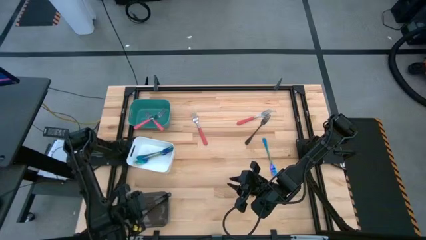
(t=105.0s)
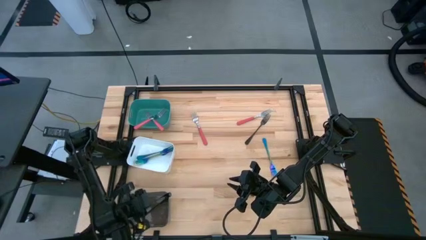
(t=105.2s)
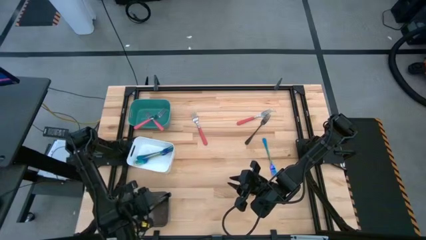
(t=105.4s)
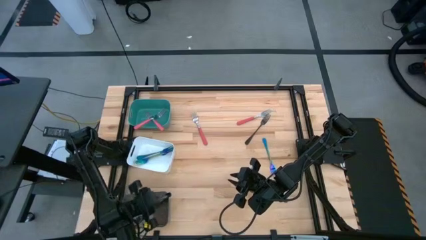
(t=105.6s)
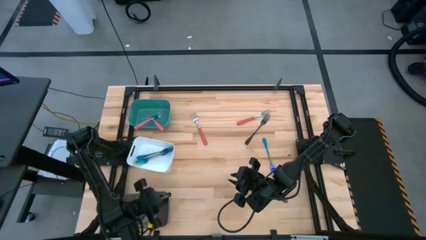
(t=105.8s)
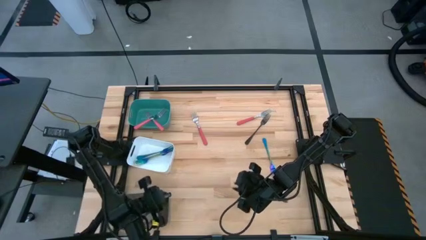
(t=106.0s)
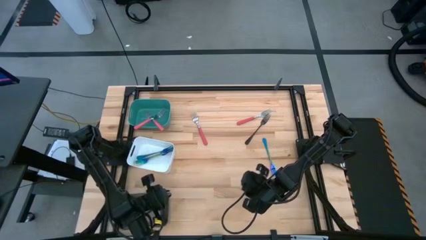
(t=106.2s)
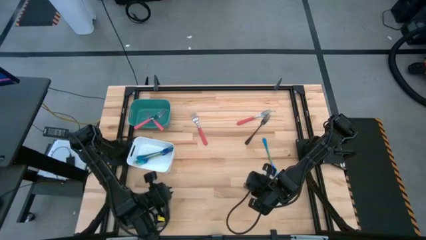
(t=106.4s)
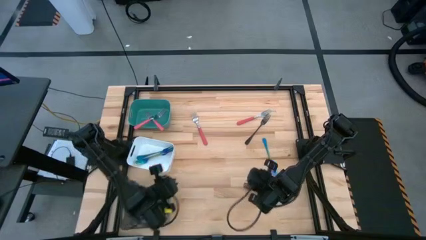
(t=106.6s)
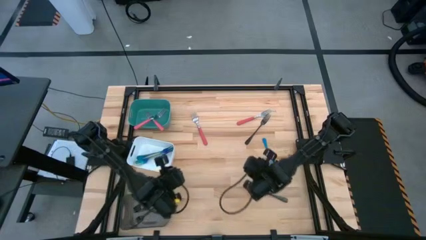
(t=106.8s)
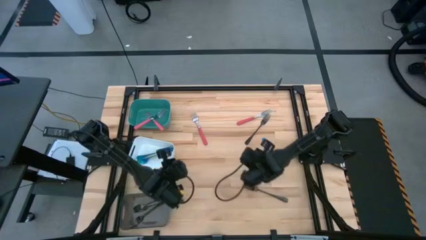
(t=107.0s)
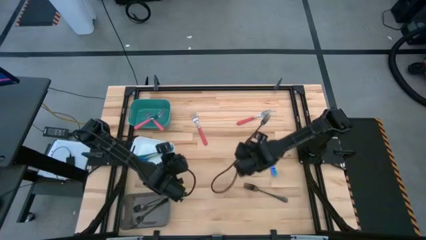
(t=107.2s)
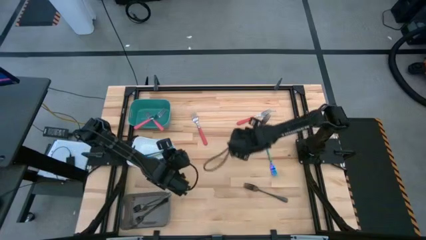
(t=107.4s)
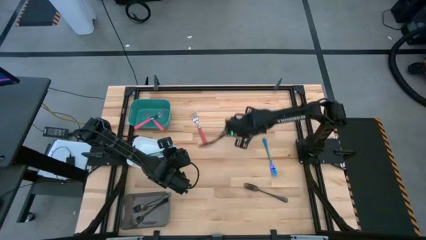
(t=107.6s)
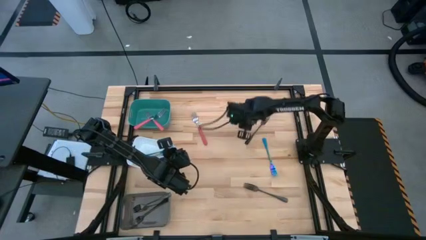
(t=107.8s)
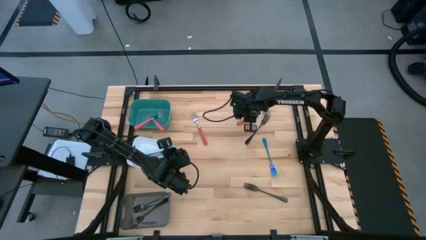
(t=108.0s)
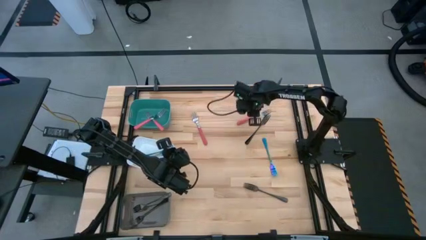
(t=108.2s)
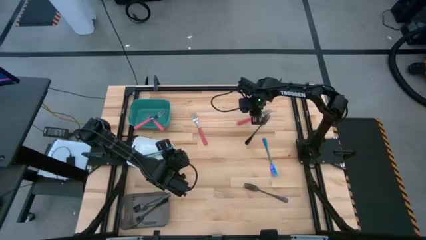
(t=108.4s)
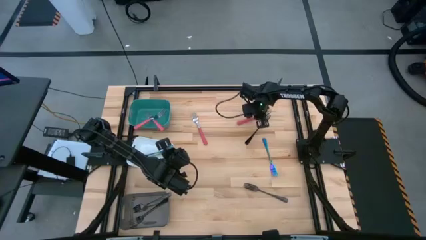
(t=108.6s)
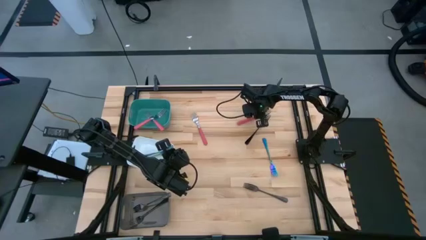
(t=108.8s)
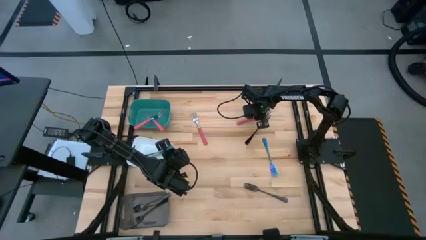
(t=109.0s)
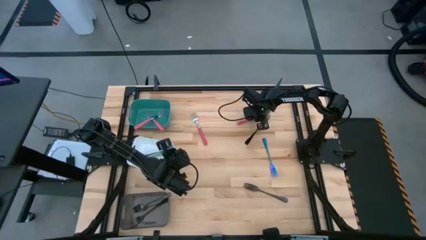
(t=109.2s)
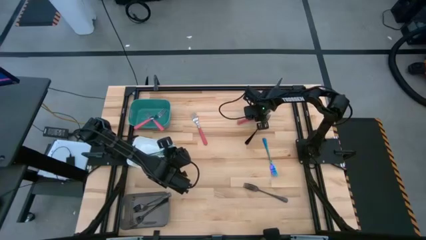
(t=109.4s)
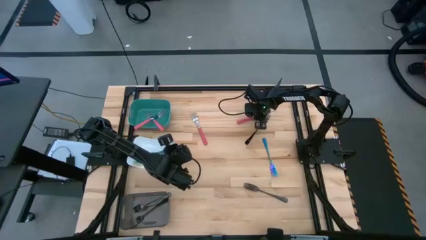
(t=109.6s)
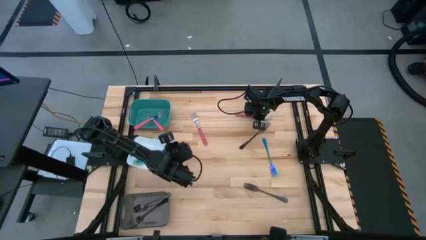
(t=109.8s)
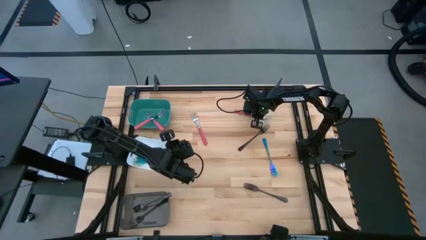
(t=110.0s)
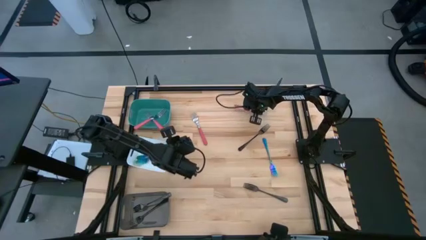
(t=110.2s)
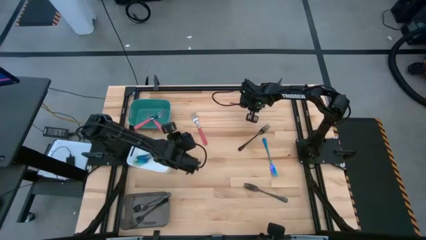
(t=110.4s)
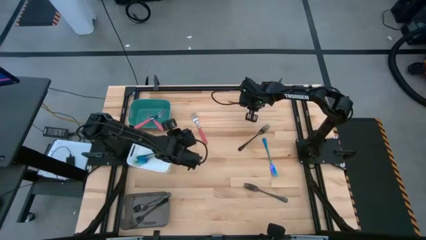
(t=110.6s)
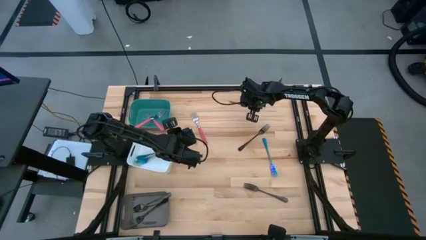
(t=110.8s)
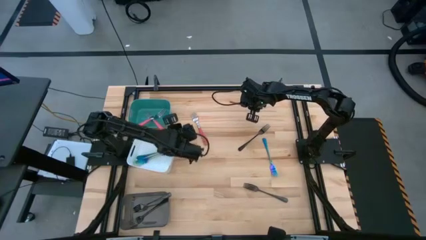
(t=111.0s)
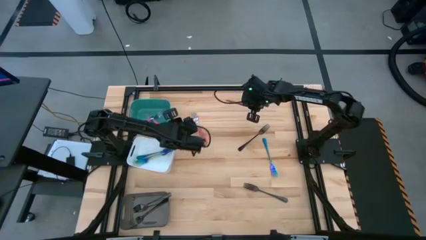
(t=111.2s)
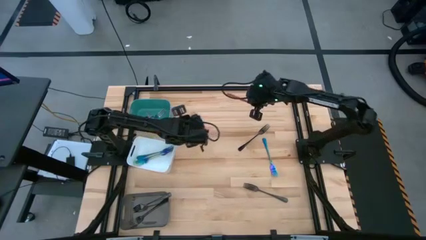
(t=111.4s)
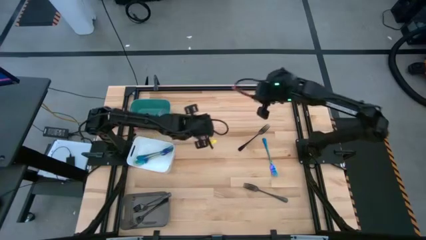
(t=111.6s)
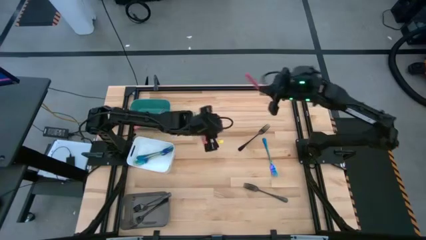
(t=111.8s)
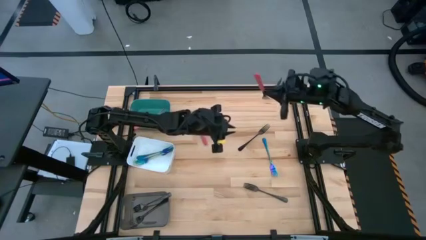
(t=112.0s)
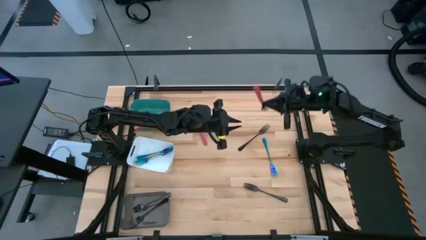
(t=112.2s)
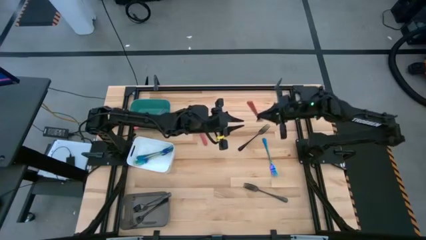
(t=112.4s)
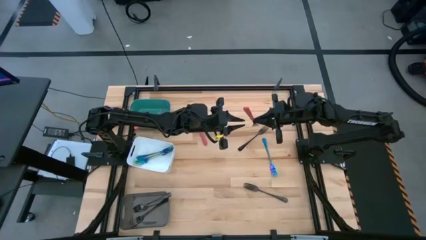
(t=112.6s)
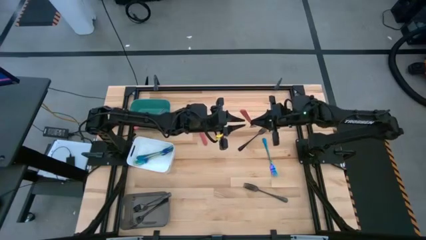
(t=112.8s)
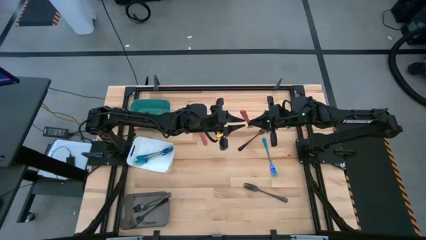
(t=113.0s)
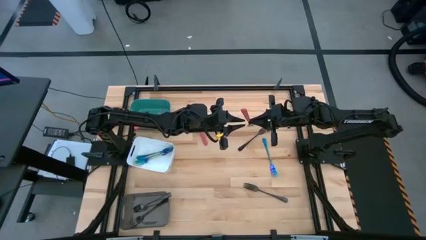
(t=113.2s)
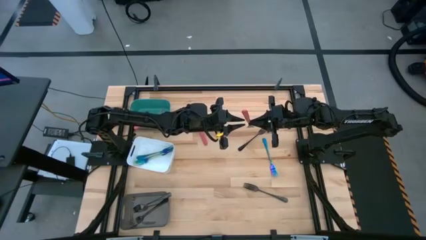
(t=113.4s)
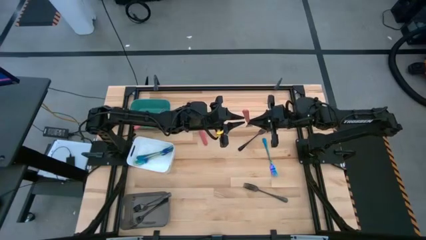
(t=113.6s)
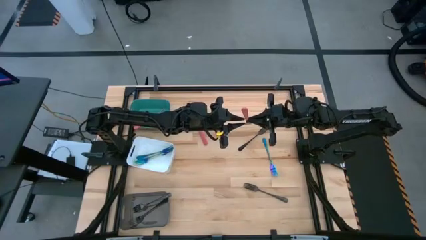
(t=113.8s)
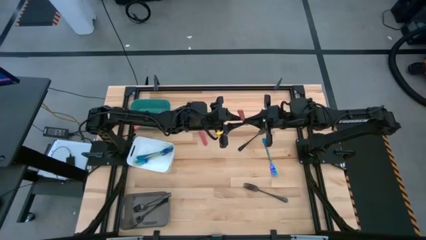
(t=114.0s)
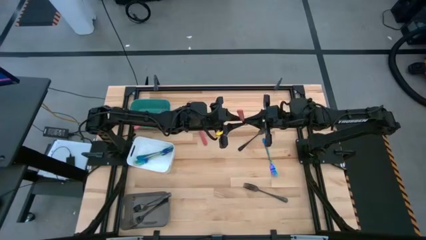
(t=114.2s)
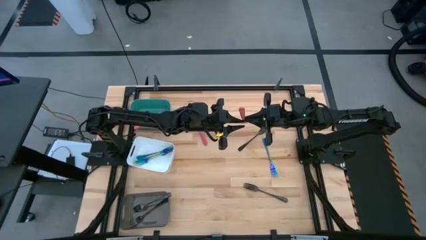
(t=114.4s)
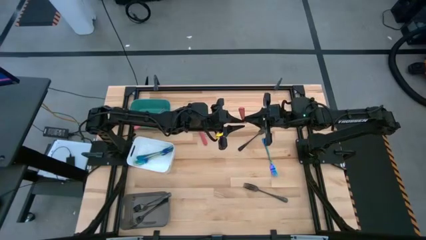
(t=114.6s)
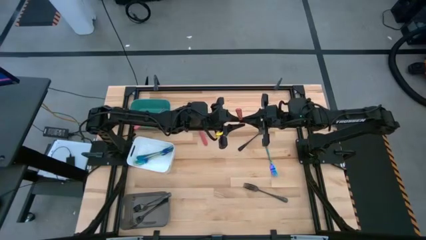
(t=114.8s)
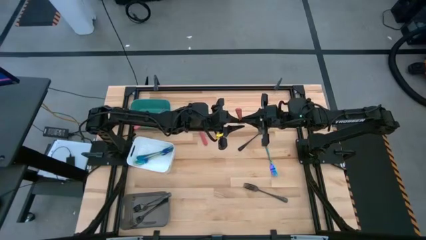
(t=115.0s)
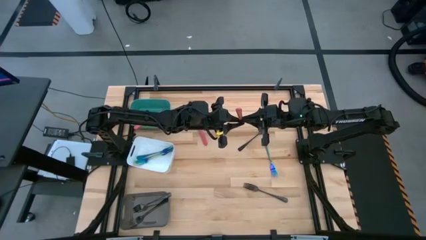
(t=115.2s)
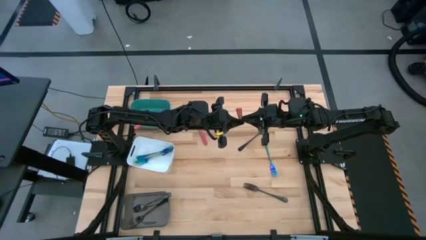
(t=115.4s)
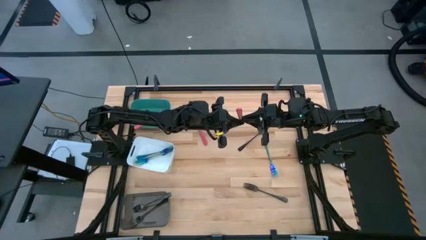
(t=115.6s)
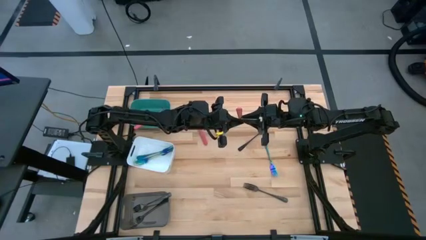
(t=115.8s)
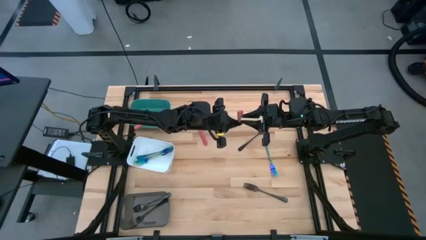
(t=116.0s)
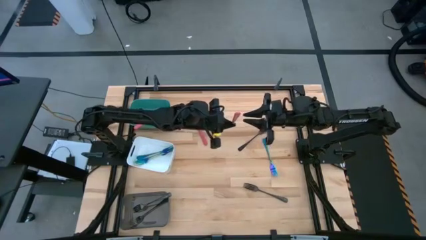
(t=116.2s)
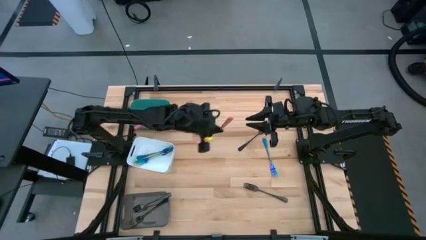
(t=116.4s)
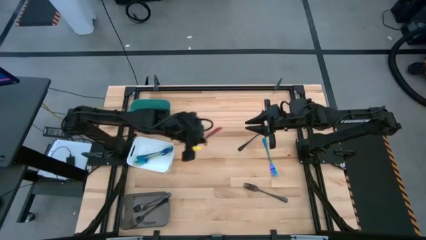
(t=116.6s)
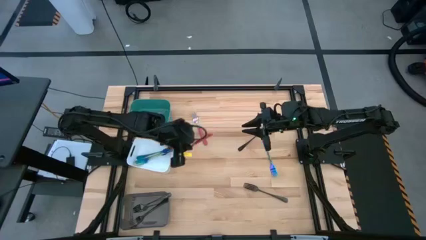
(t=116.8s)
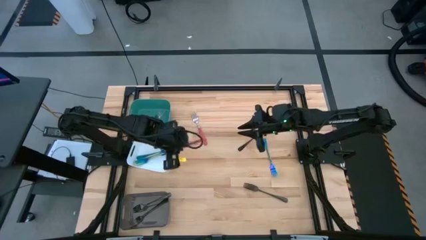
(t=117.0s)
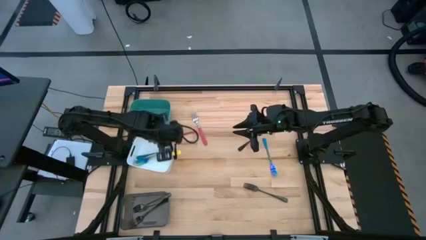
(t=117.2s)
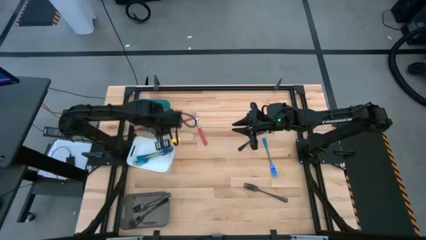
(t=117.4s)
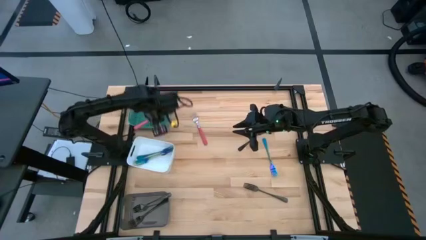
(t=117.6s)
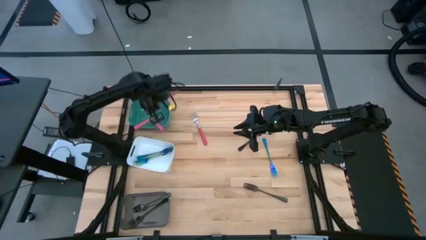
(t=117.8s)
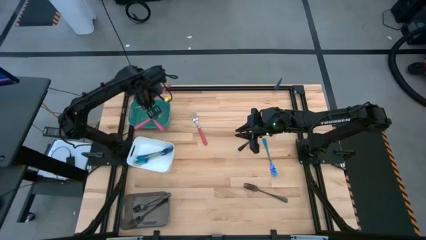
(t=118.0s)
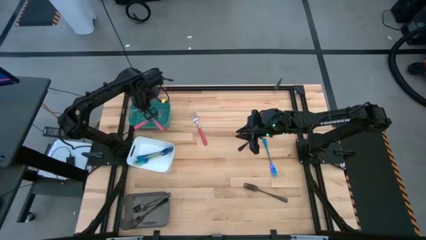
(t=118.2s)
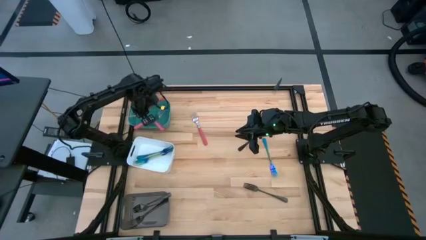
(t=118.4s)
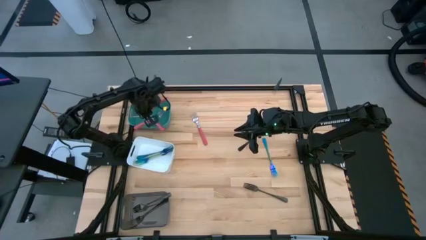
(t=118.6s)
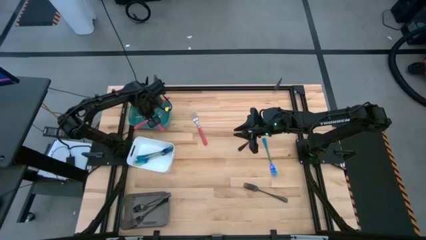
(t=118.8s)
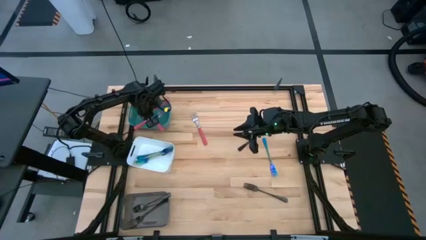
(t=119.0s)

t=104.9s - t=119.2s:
Task: Sort silverware by color (type)
Put the pink fork into the green bin

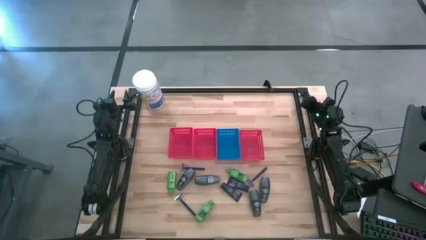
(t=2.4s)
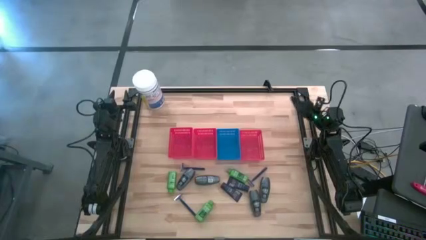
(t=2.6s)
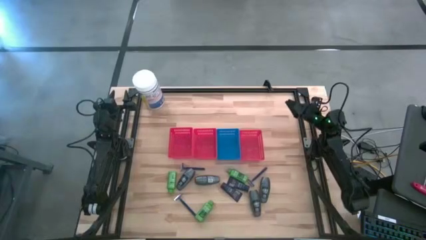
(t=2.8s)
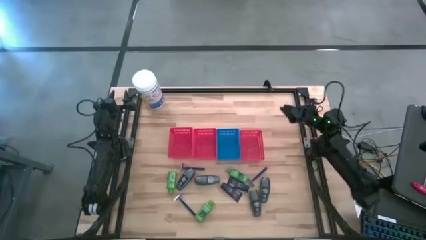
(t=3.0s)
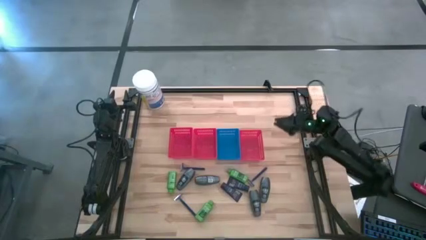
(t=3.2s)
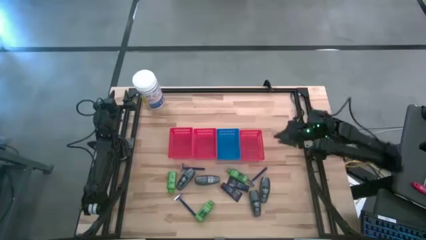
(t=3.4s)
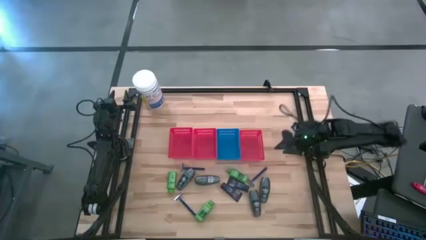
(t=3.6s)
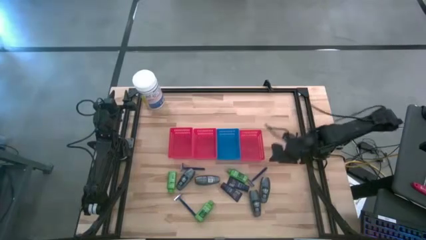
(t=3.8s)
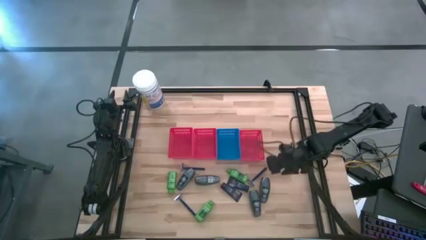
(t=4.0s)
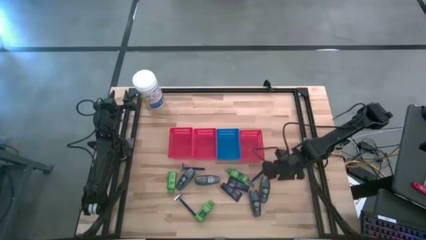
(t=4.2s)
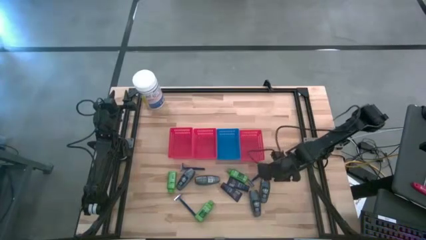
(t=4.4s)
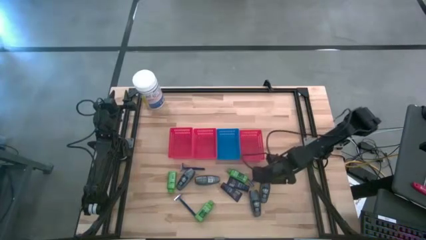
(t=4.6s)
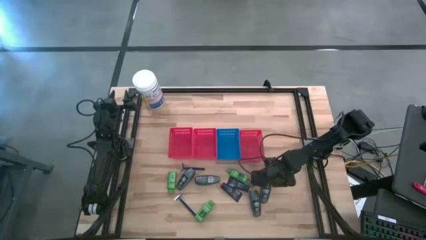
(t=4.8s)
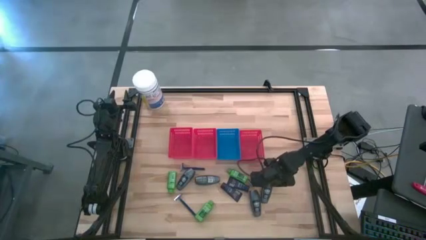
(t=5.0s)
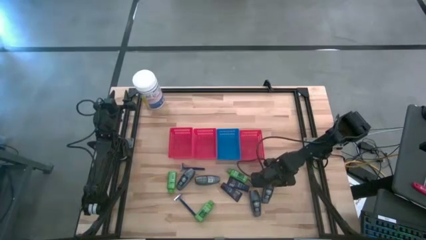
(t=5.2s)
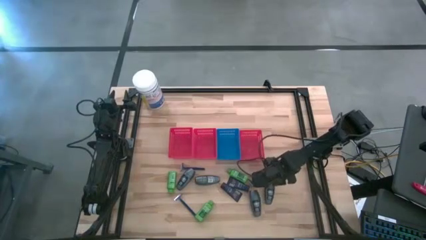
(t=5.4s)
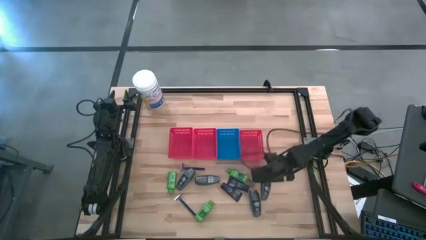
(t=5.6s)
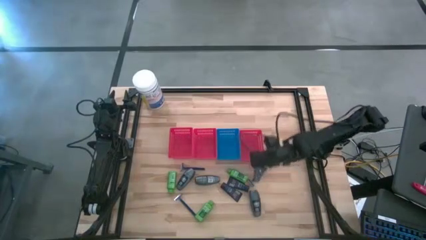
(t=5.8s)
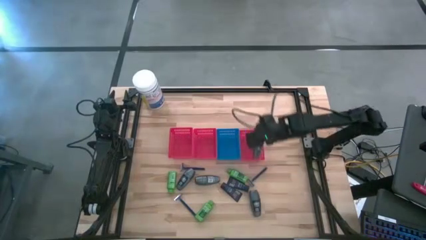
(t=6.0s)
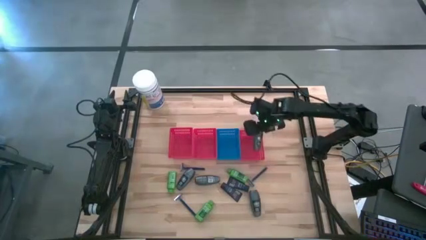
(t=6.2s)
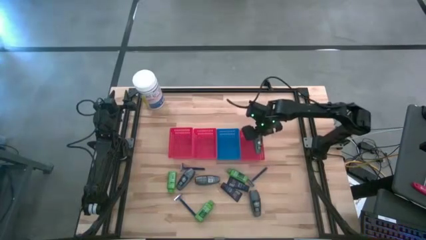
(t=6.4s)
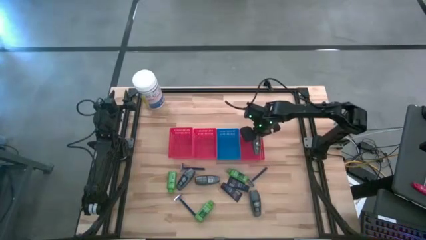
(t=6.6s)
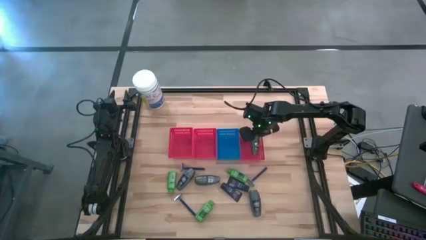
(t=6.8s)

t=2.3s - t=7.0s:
Task: Pick & Place Travel size toiletries
Put the black deodorant into the right red bin
